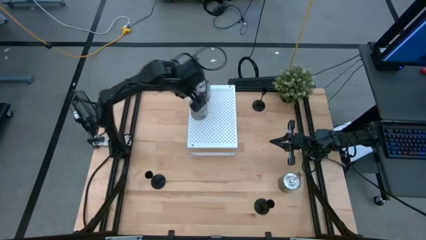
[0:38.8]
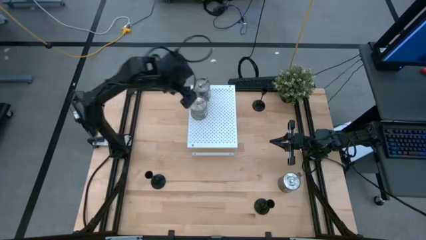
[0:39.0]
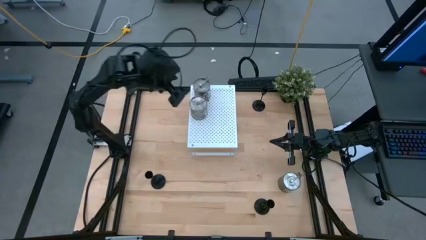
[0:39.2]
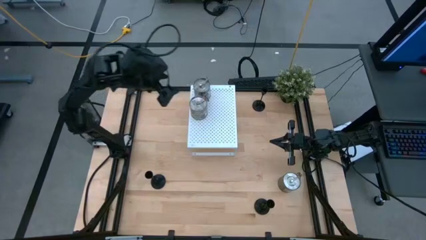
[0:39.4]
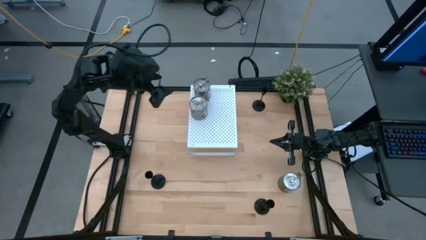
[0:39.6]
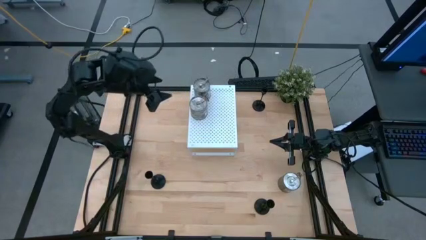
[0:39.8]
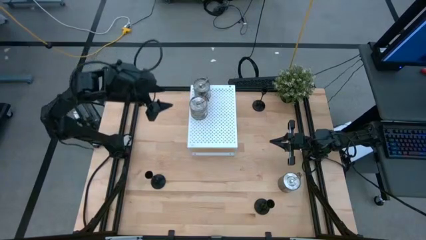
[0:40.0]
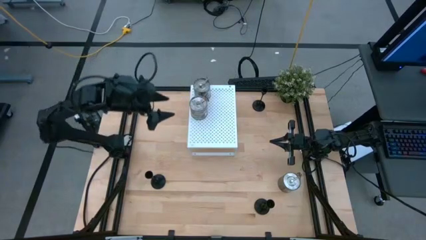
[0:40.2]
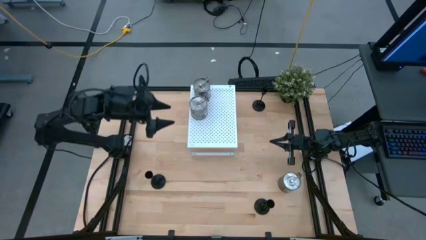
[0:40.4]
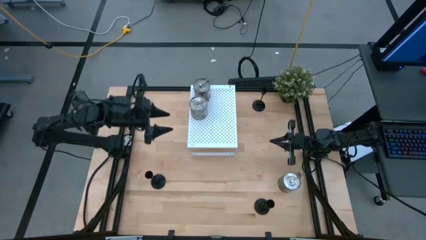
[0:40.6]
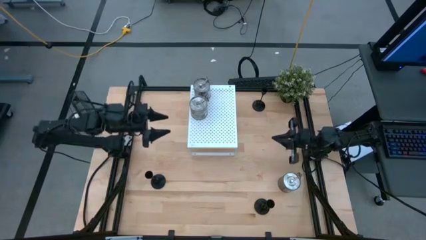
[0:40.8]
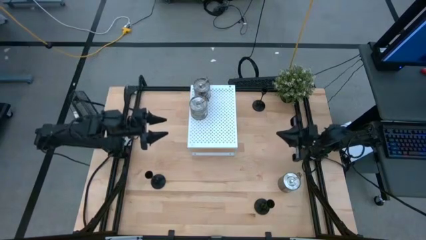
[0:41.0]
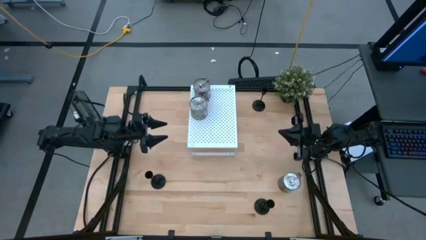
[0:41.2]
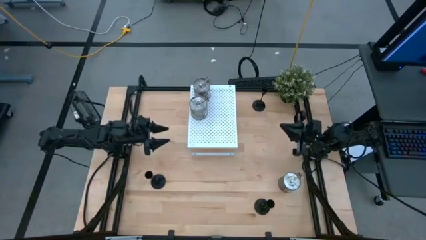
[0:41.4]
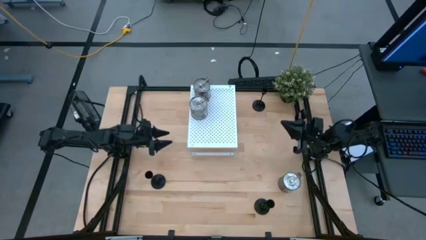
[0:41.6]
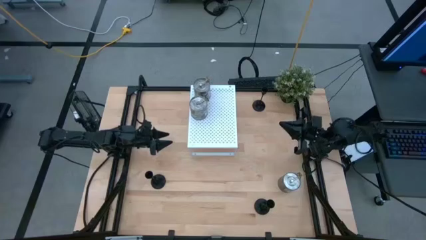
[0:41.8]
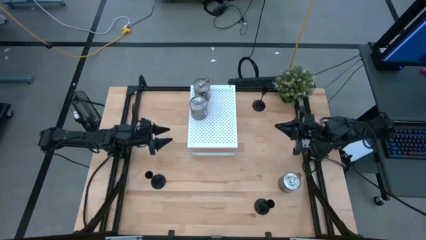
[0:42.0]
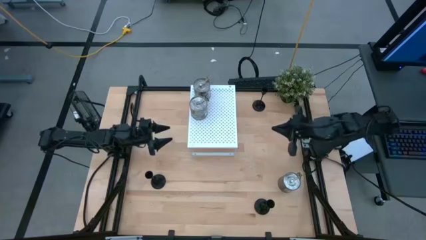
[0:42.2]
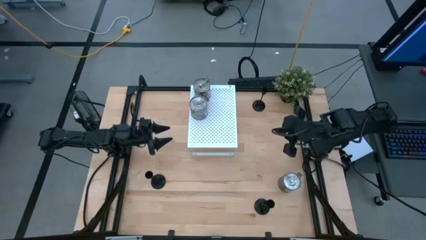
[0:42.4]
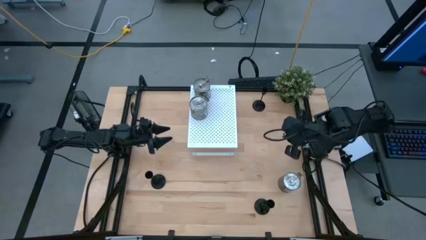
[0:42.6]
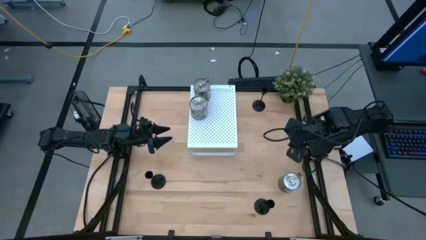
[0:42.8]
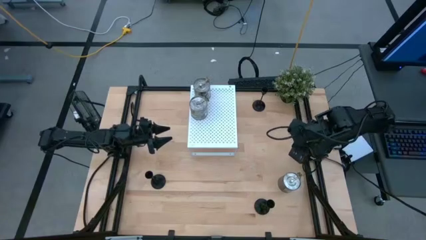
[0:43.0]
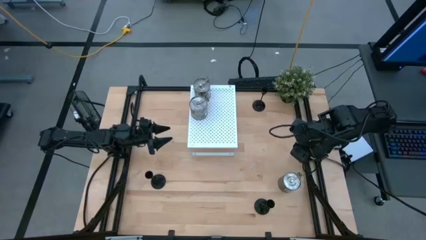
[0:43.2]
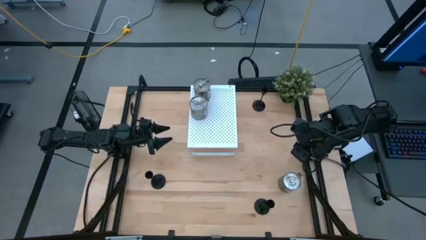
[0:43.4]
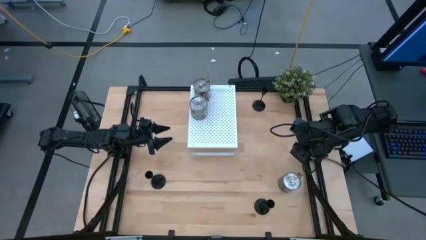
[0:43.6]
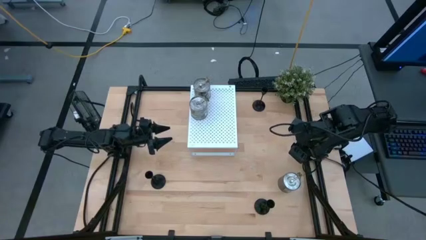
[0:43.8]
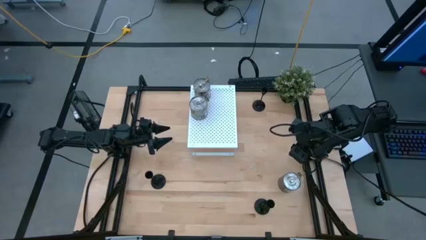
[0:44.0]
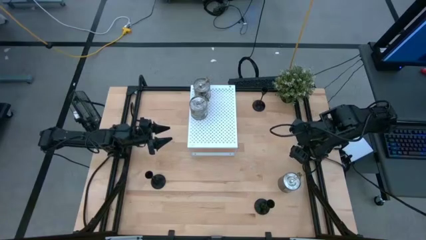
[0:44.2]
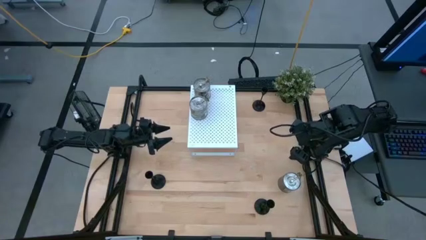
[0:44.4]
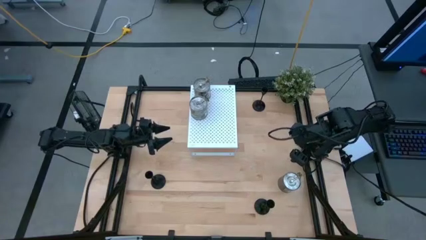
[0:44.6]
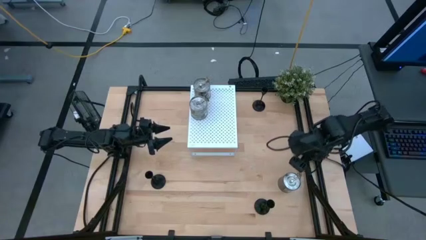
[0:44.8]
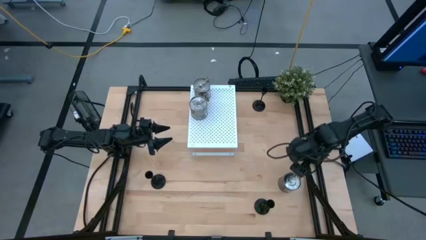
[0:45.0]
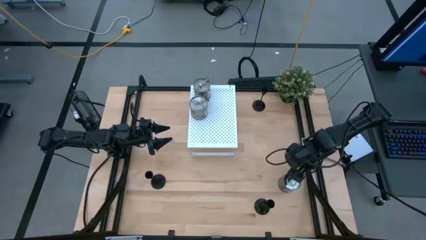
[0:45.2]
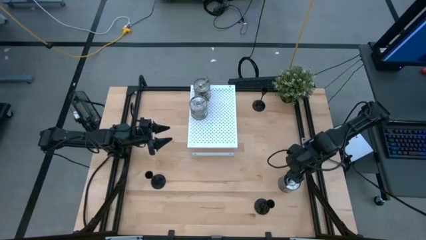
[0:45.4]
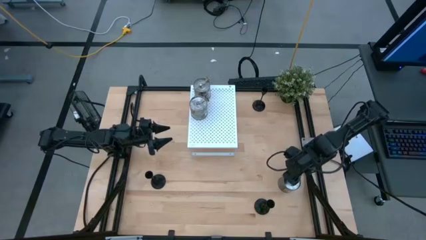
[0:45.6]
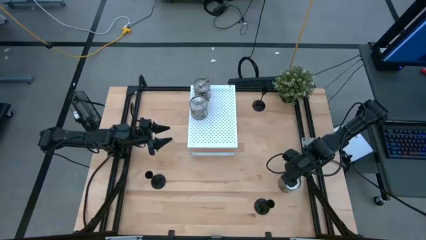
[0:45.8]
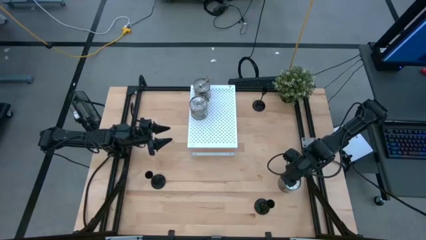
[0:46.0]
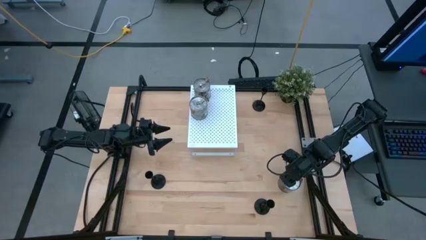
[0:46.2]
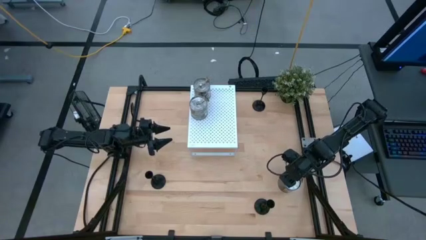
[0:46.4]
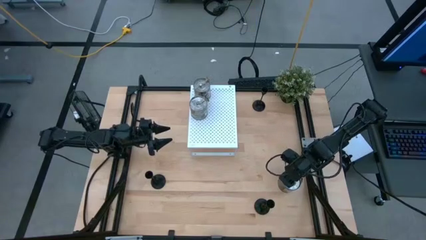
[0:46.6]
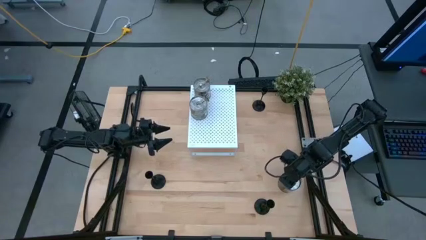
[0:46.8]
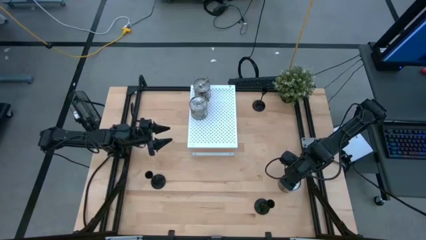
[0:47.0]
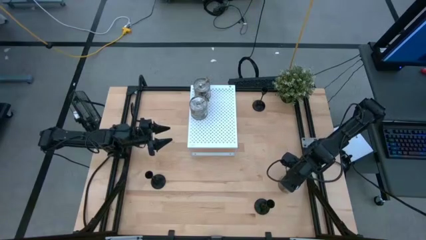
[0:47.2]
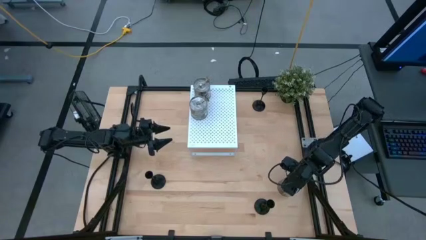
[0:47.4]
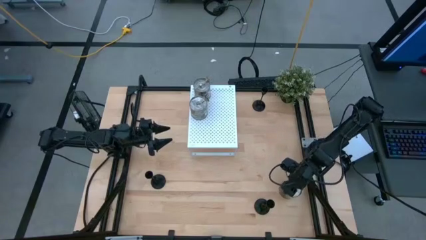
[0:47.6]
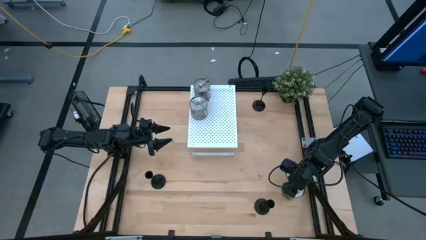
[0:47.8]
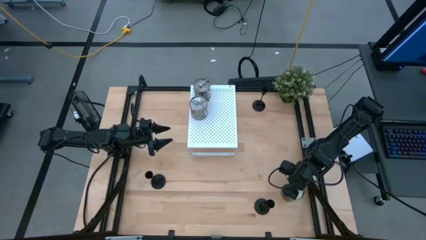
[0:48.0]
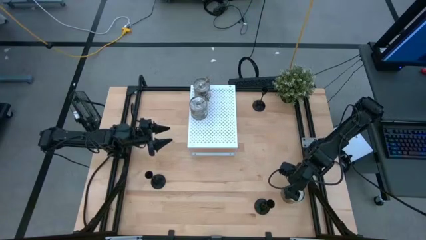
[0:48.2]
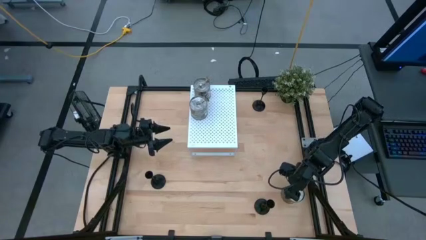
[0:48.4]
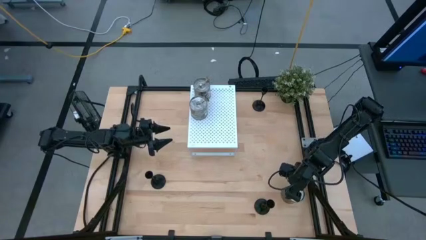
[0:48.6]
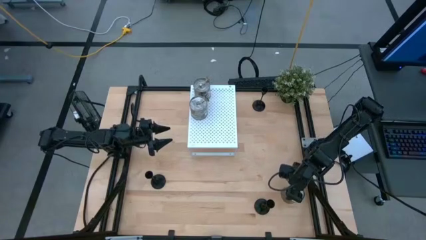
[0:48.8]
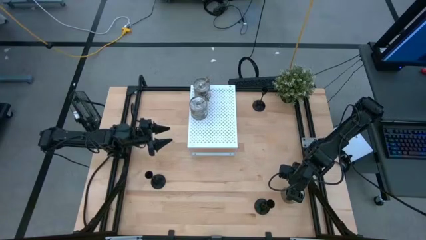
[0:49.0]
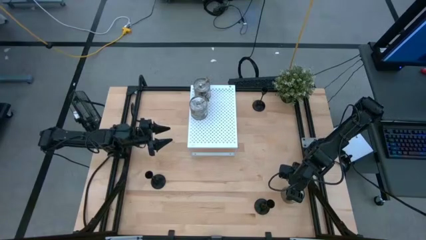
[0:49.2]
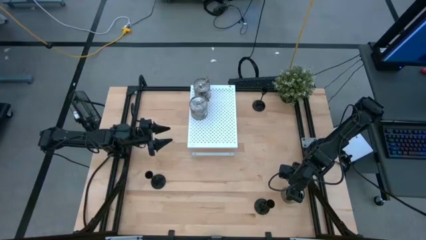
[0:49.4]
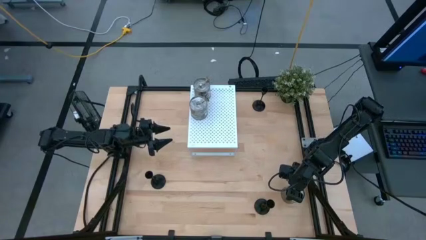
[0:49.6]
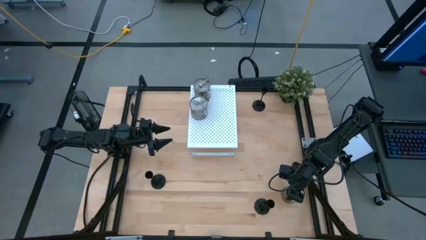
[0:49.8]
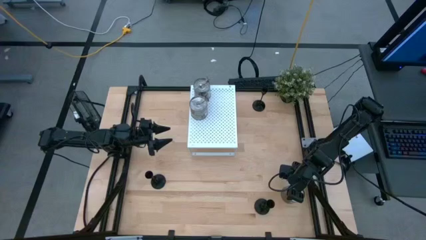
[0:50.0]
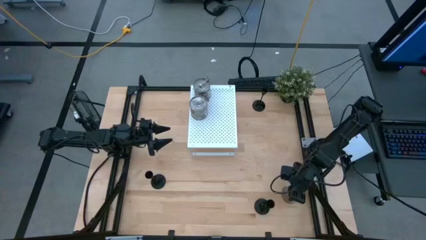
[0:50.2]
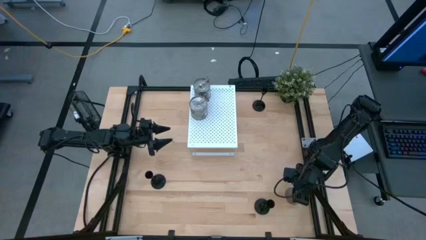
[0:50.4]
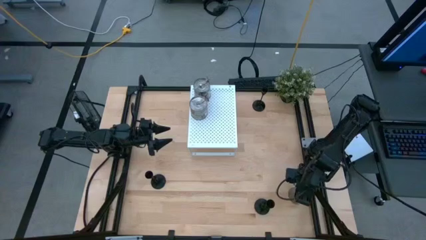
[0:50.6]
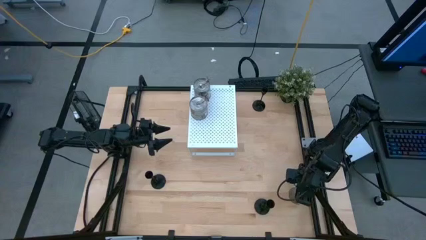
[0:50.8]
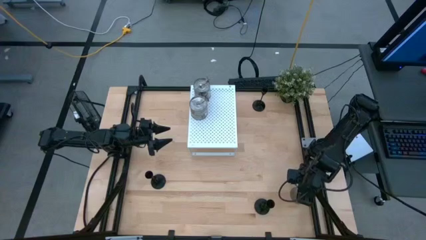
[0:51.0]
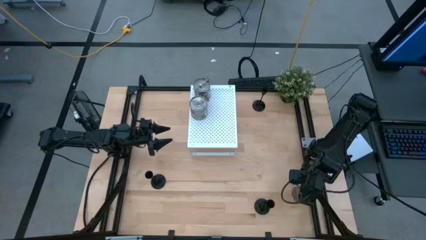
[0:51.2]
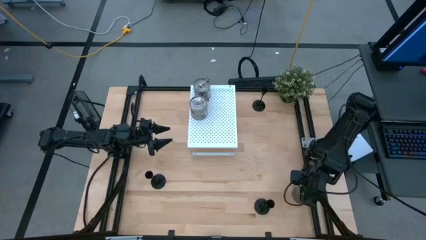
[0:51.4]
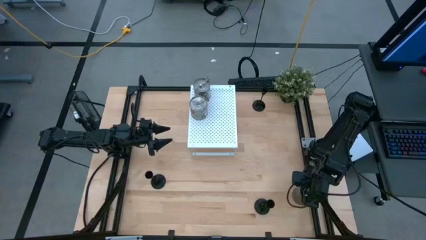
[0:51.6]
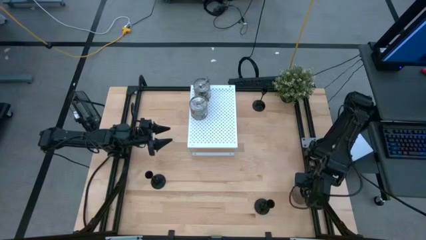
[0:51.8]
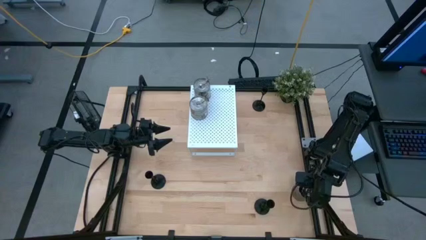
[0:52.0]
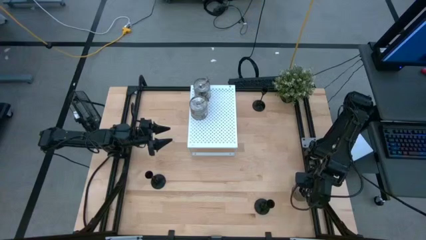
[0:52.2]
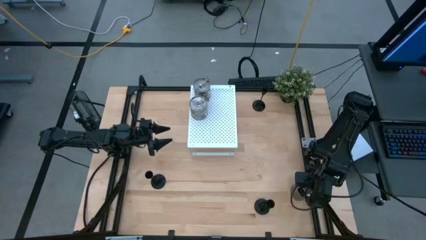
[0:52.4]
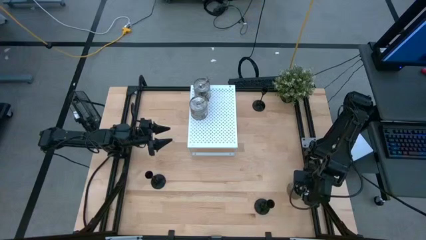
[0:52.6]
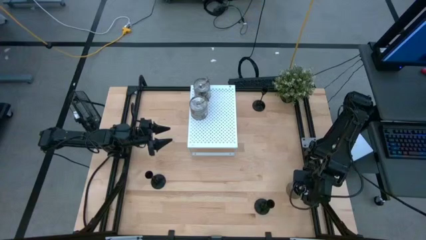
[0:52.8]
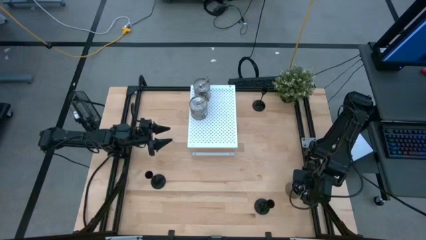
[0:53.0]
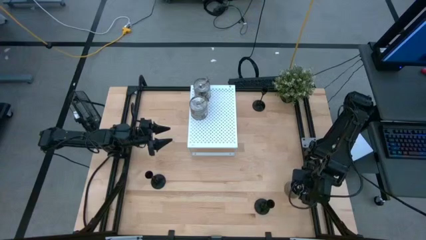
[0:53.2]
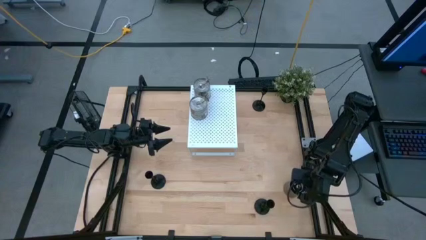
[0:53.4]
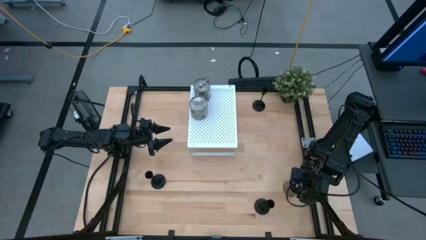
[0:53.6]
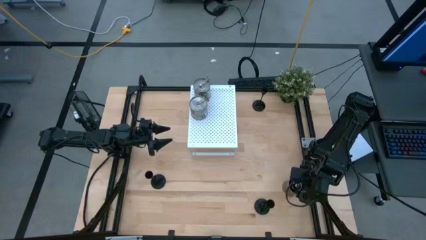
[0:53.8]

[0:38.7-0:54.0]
Task: Pick & Place candle stick holders
Put the silver scented candle on the shelf
